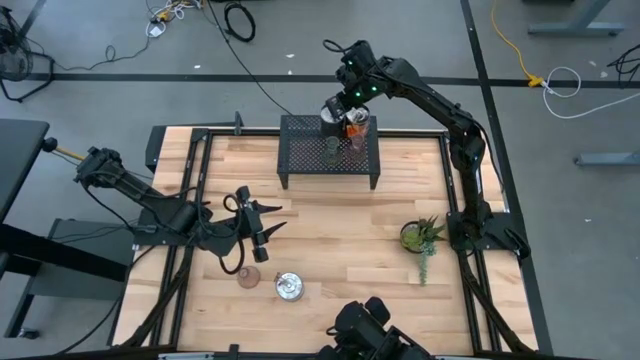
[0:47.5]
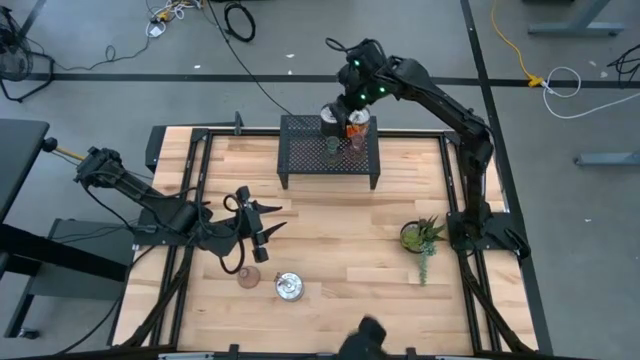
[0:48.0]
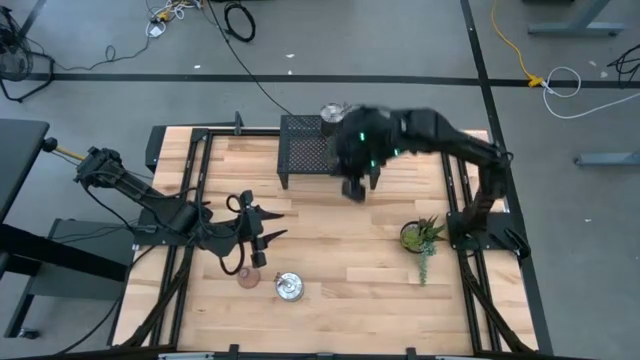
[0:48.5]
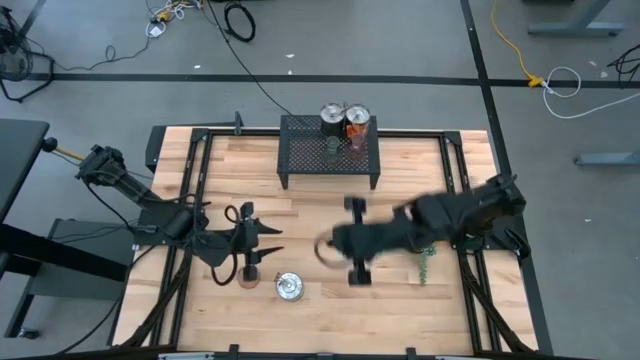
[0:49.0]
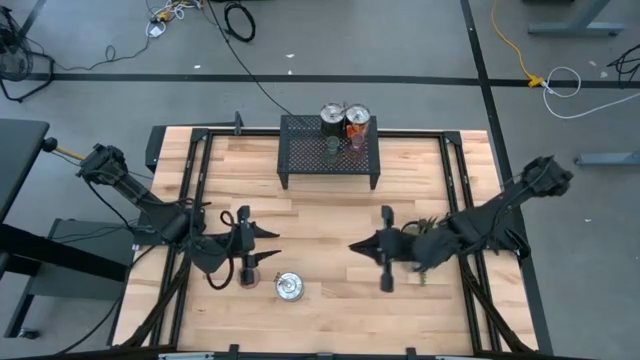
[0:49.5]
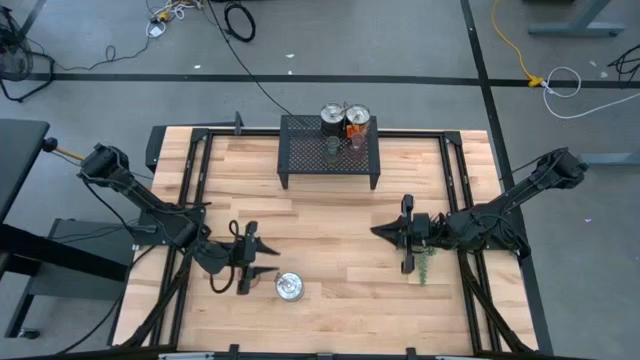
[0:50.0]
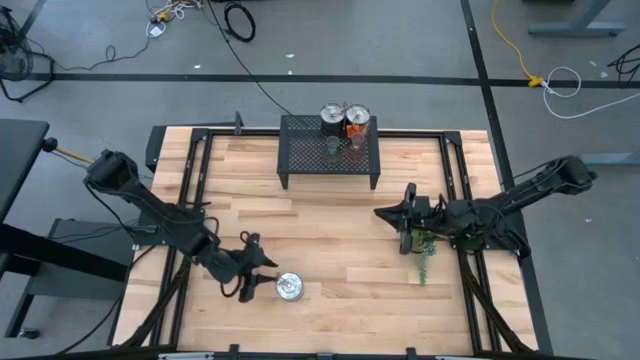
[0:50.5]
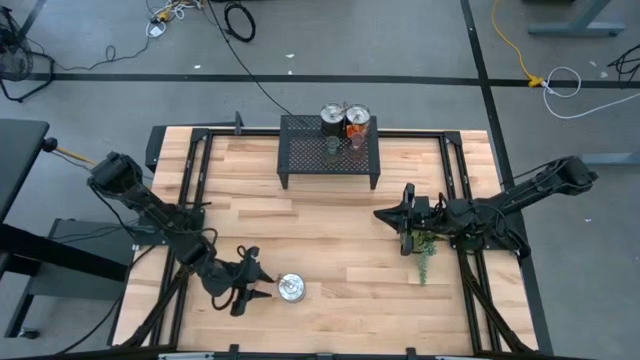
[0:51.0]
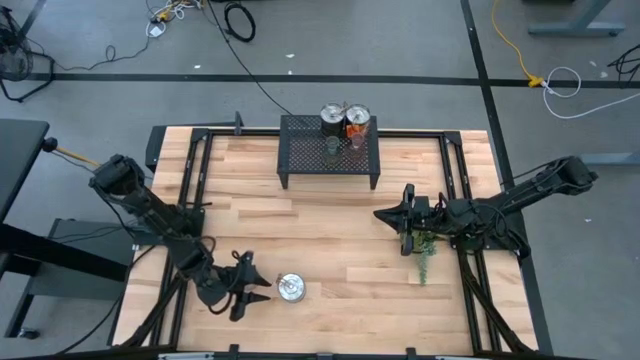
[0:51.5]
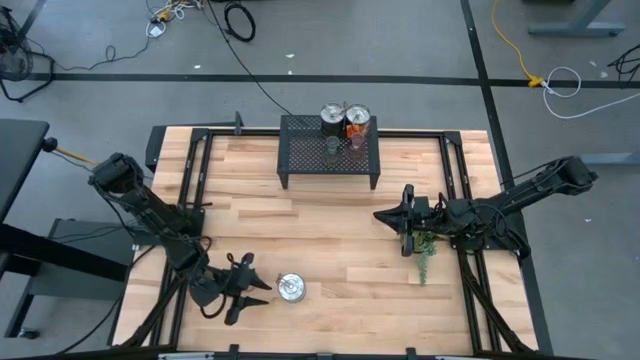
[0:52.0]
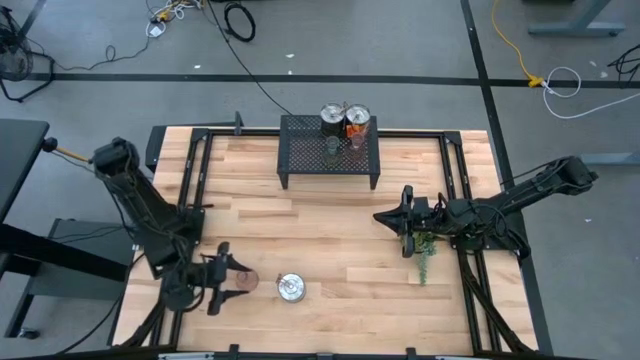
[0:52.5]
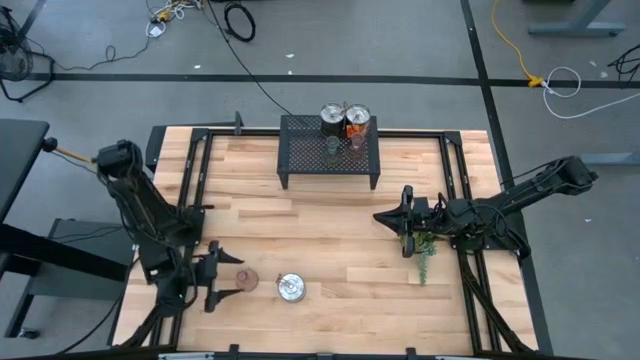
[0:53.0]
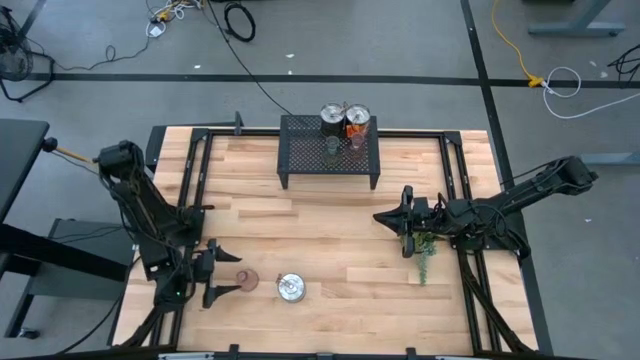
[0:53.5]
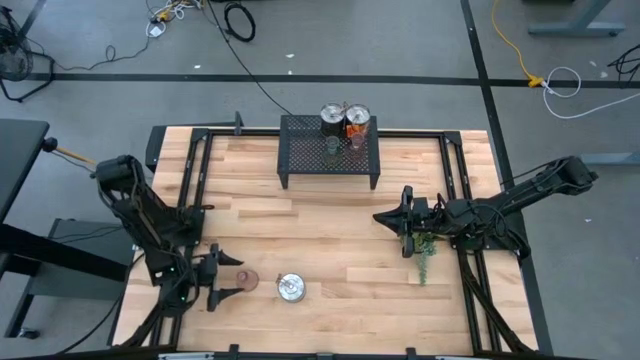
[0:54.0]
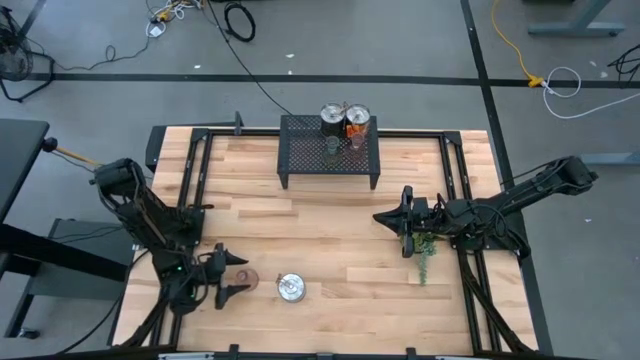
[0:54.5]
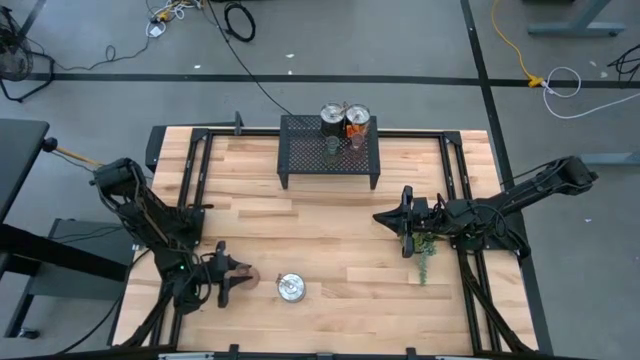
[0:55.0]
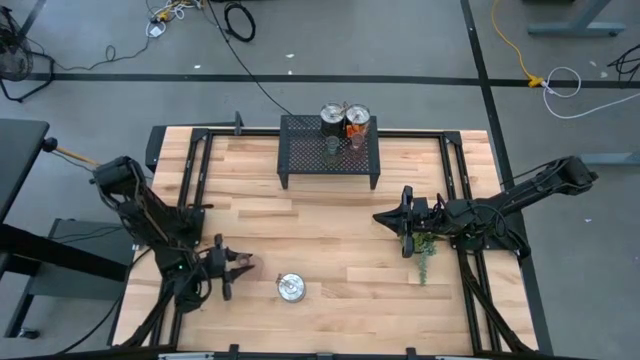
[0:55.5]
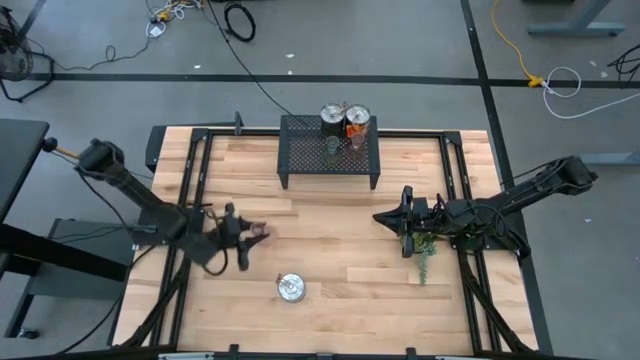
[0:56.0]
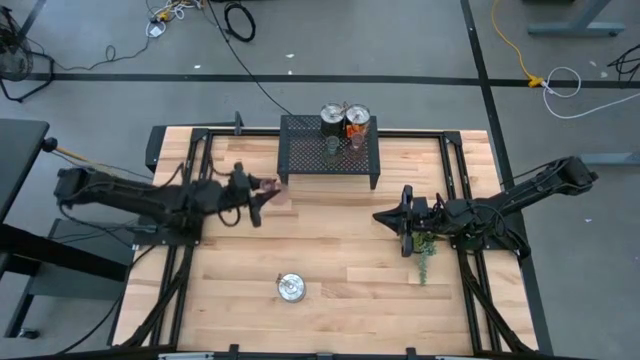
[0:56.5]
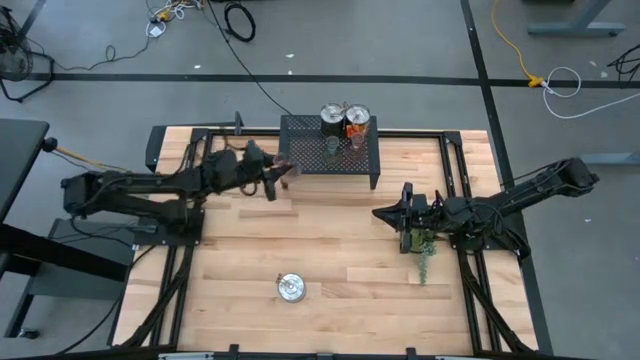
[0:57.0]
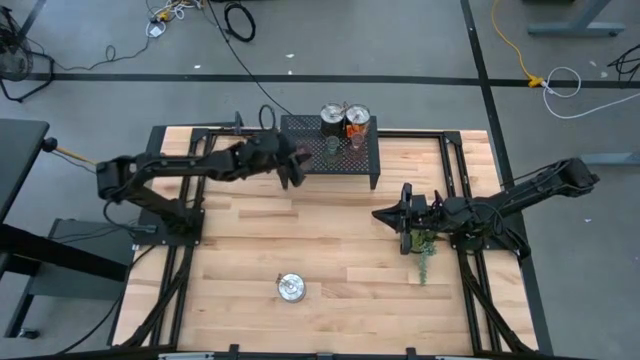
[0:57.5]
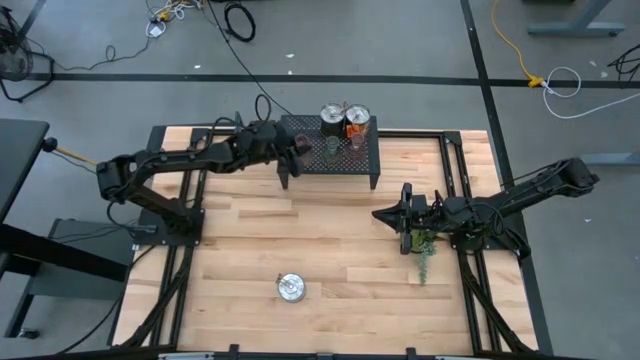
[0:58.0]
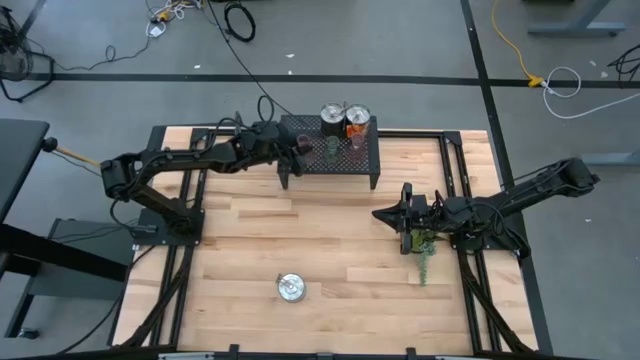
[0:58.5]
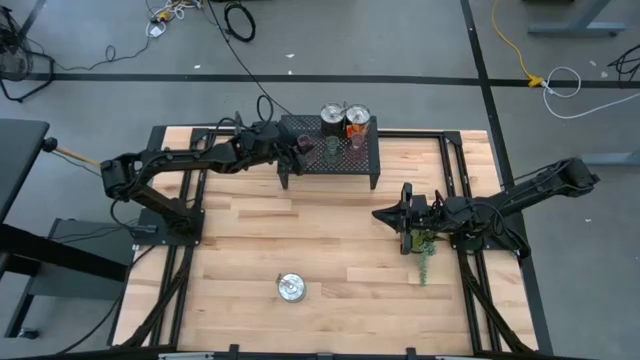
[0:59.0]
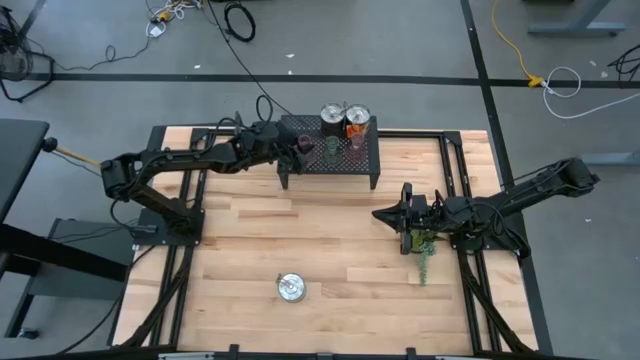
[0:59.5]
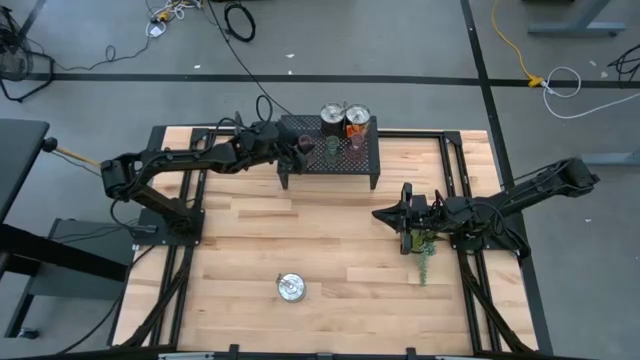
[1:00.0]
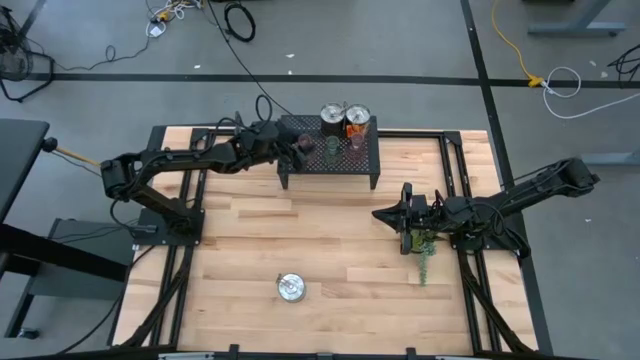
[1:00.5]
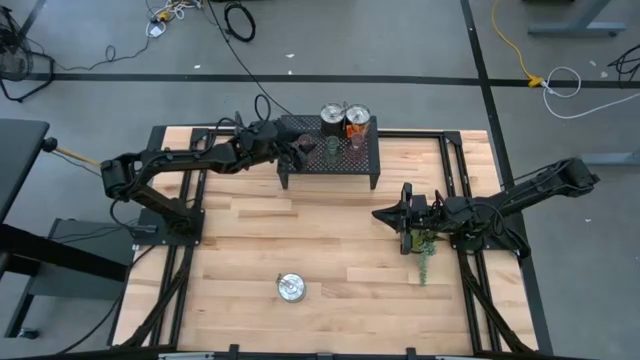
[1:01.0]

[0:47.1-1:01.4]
Task: Pick & Place candle stick holders
Put the pink candle holder on the shelf

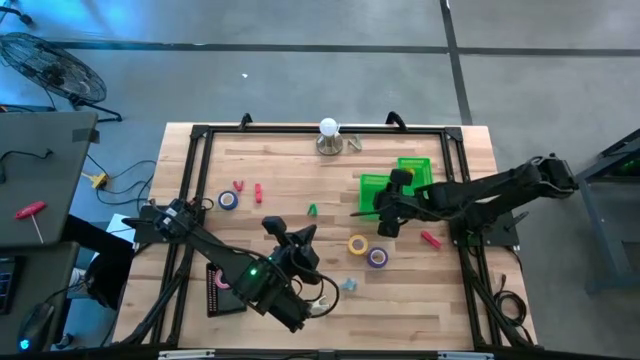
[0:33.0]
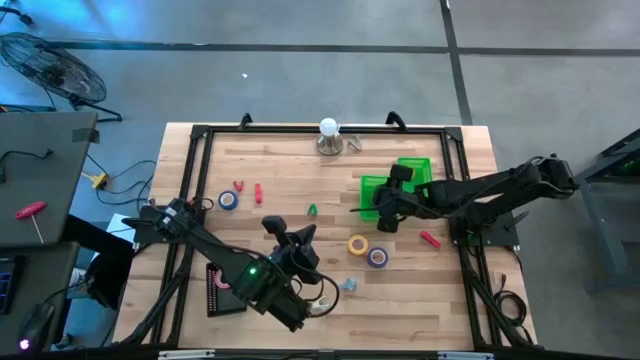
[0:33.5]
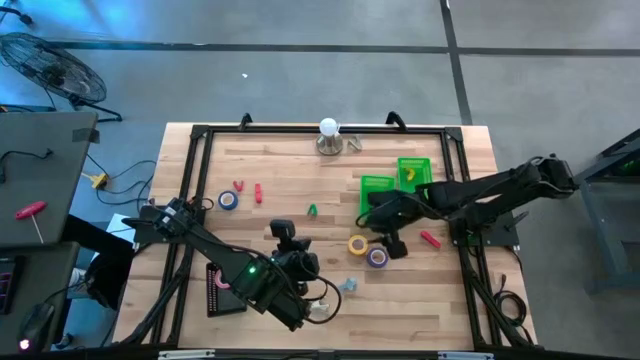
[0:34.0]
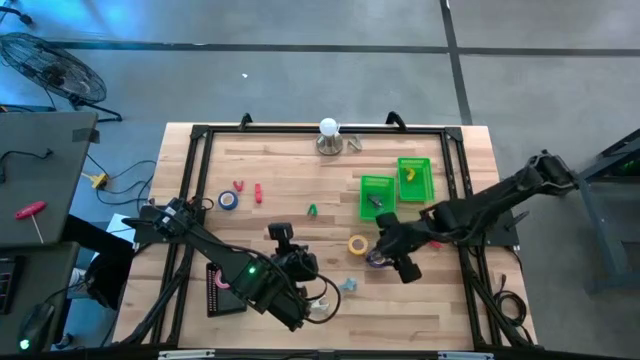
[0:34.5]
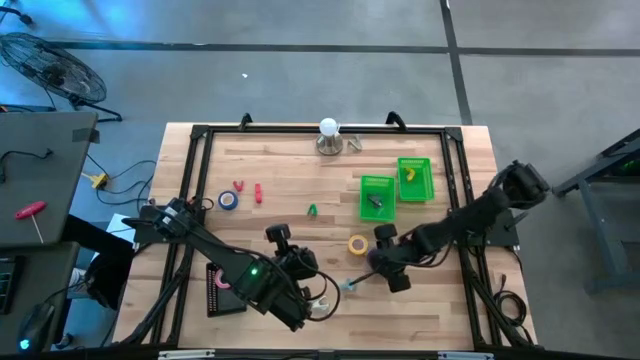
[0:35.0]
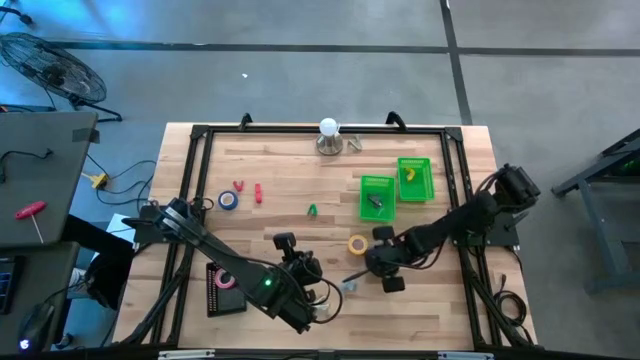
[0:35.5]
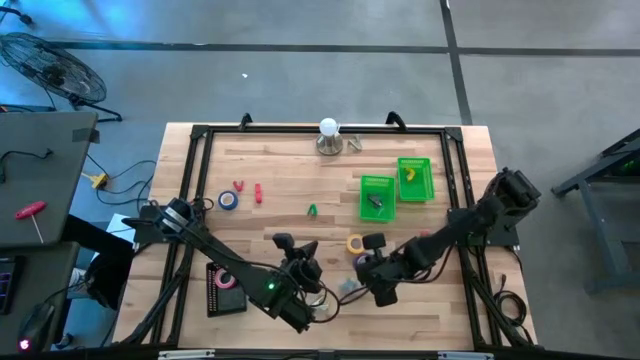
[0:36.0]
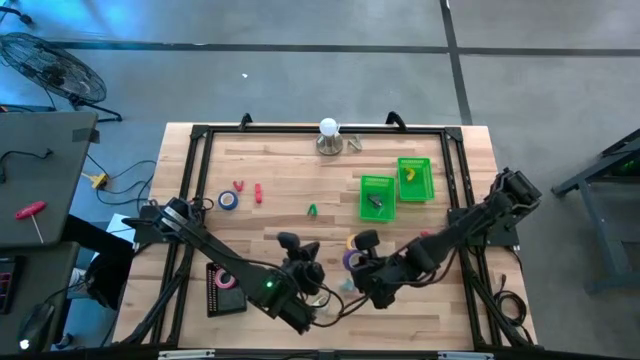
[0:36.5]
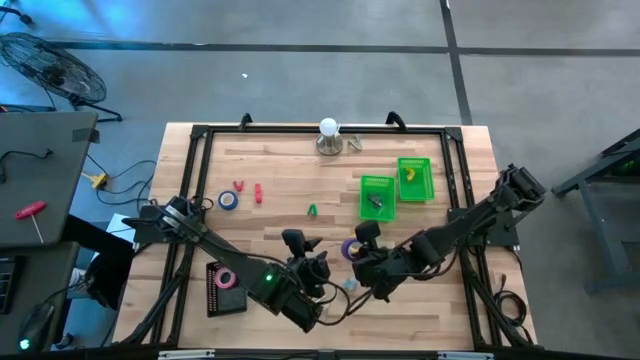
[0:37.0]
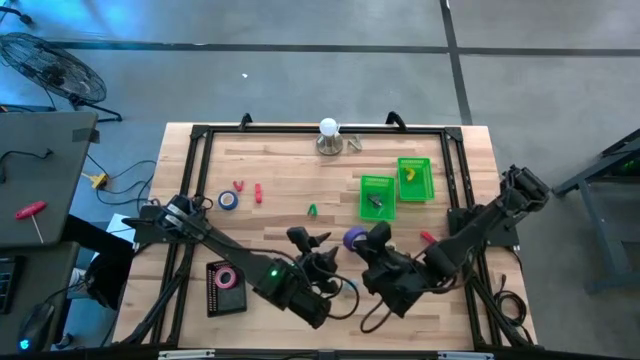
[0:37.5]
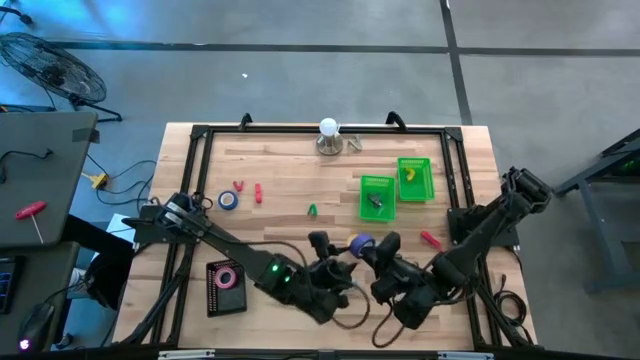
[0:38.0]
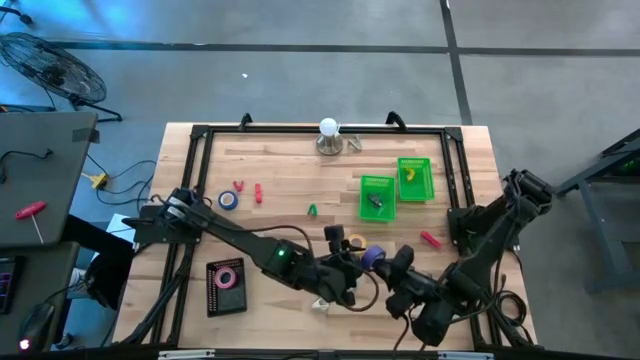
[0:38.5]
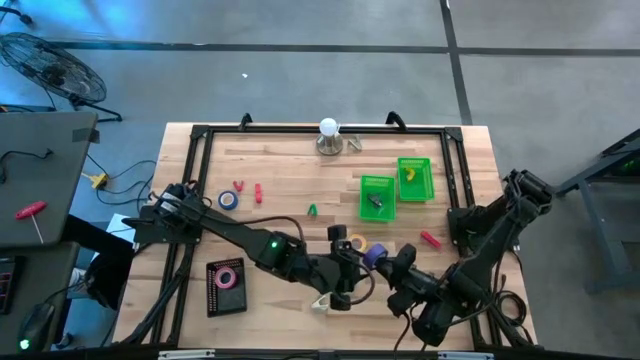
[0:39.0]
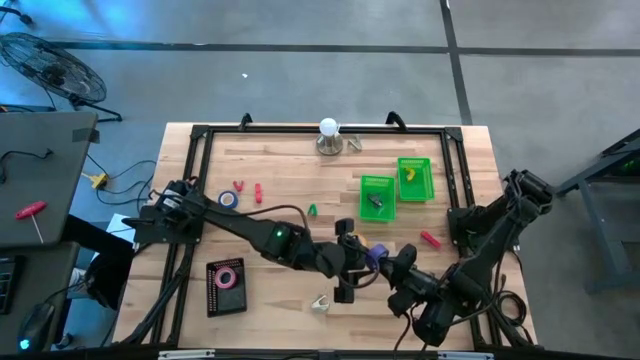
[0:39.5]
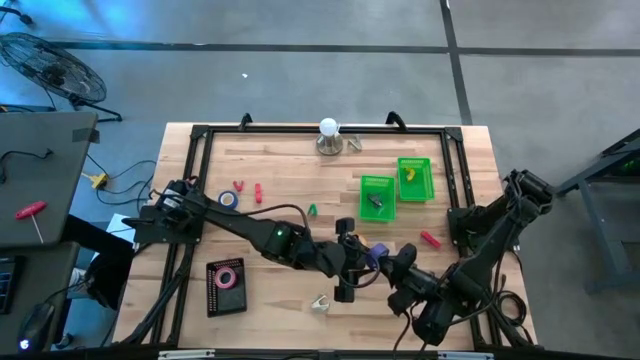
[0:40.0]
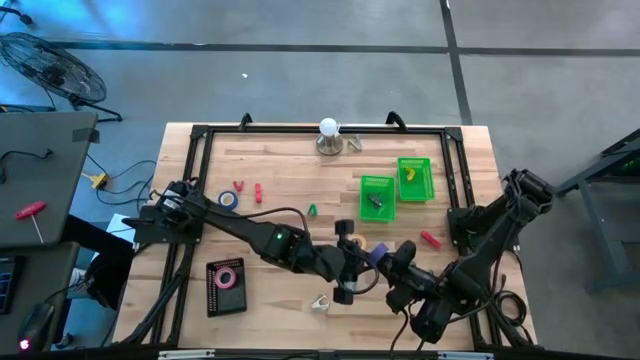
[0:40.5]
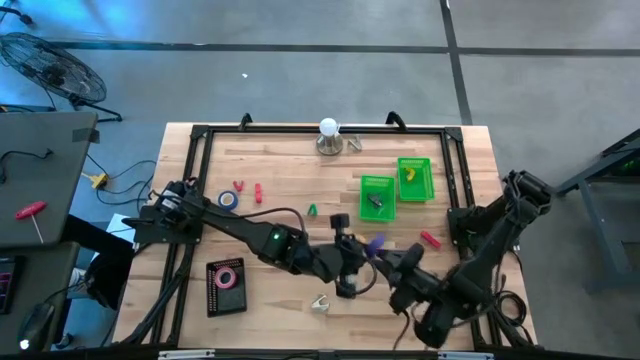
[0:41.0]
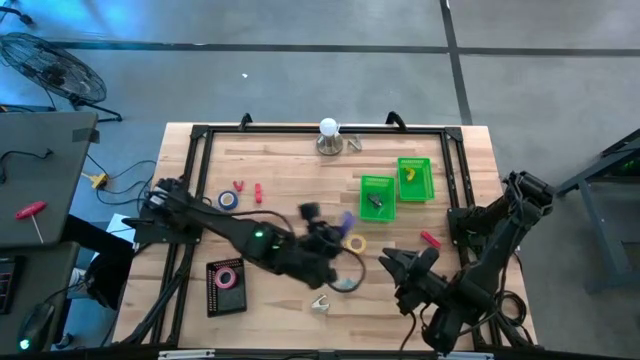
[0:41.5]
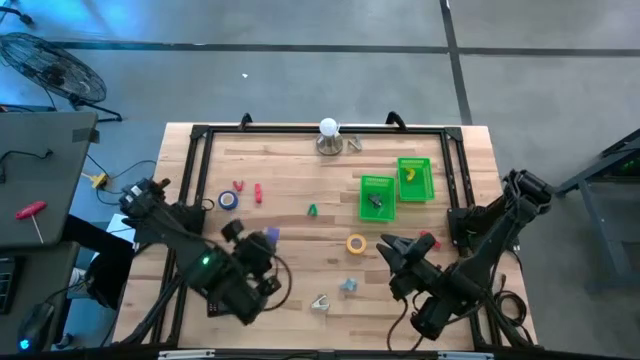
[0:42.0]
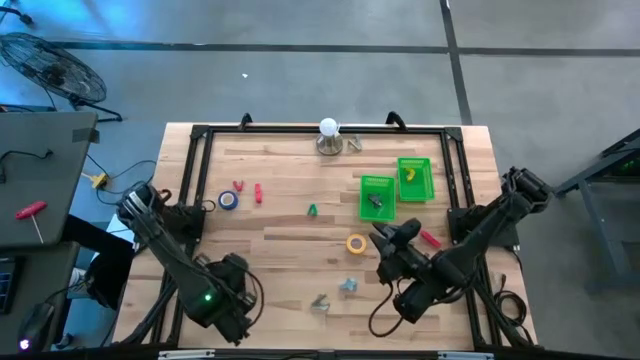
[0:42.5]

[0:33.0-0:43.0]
Task: Pick and place Stapler, Stapler remover, tape
Put the purple tape into the black basket
